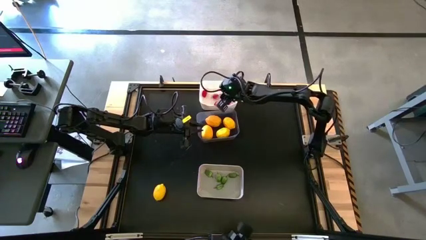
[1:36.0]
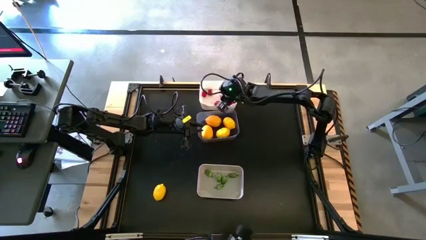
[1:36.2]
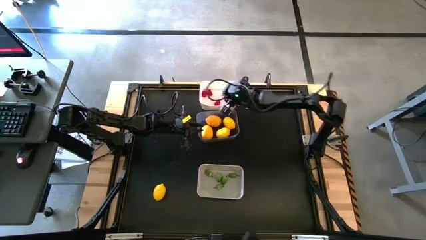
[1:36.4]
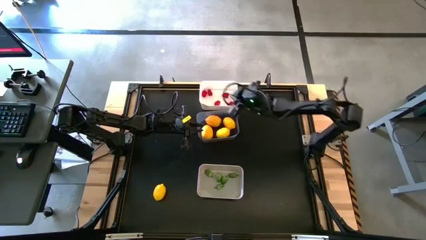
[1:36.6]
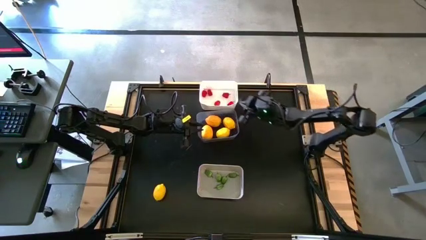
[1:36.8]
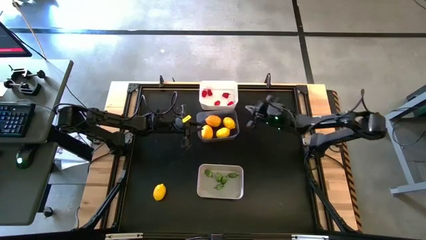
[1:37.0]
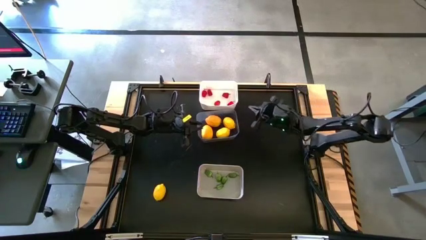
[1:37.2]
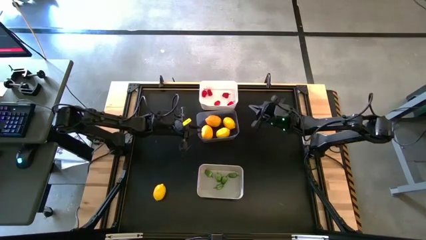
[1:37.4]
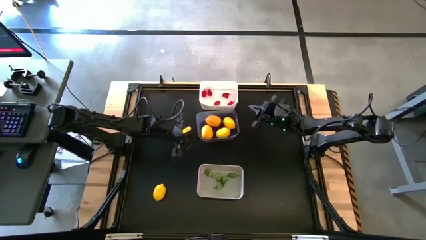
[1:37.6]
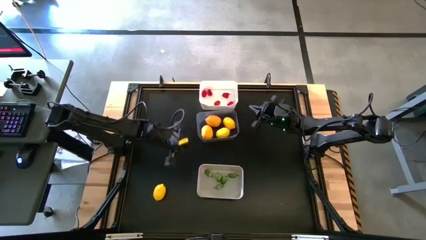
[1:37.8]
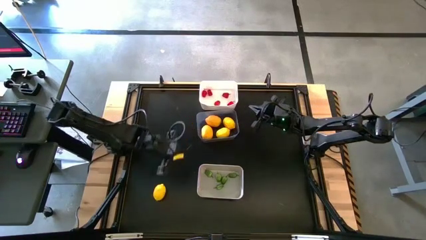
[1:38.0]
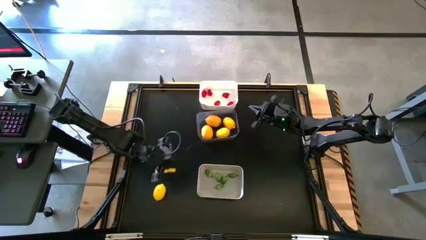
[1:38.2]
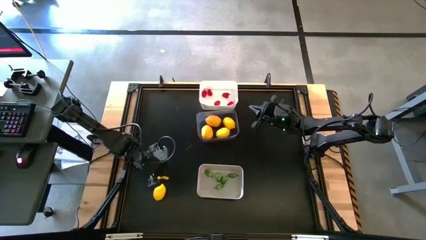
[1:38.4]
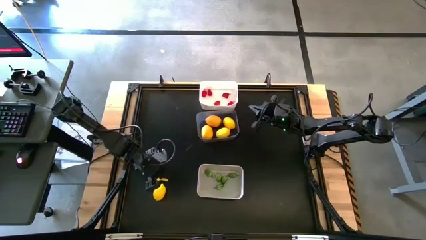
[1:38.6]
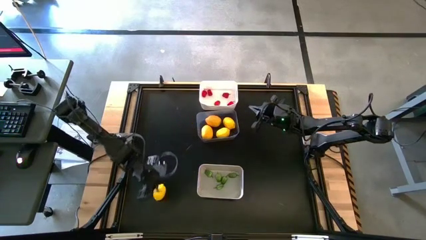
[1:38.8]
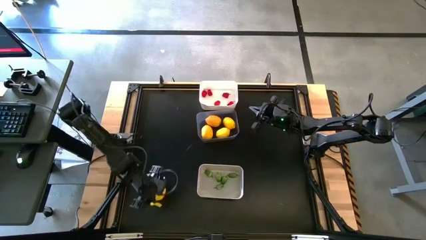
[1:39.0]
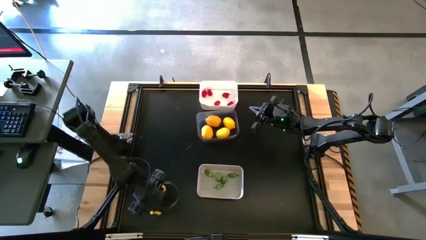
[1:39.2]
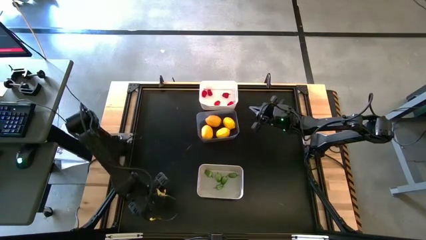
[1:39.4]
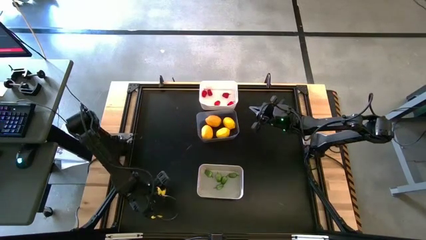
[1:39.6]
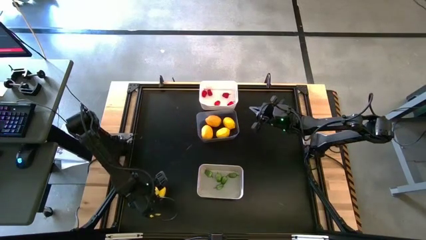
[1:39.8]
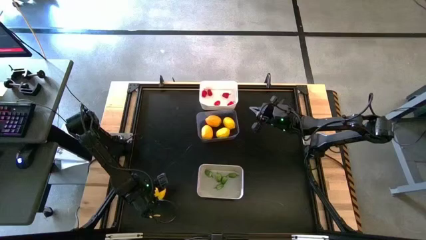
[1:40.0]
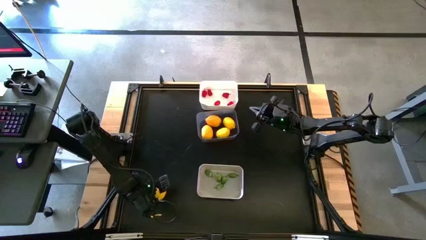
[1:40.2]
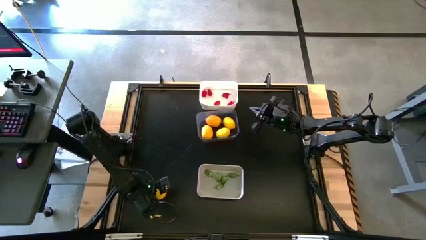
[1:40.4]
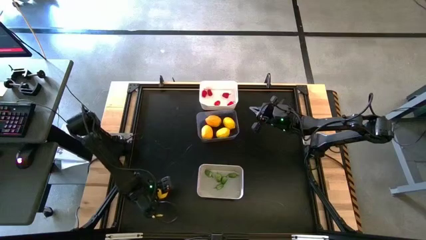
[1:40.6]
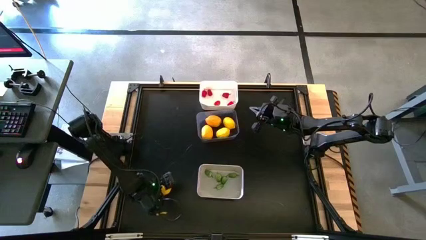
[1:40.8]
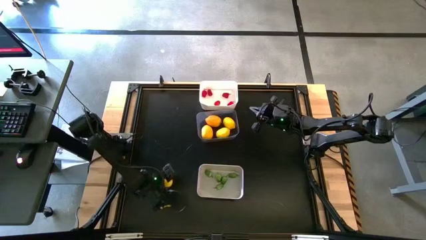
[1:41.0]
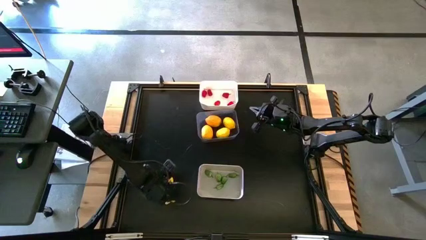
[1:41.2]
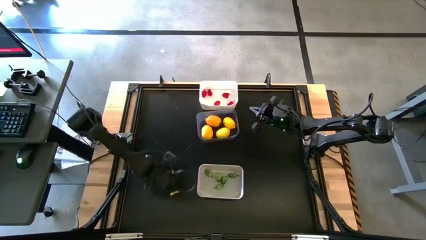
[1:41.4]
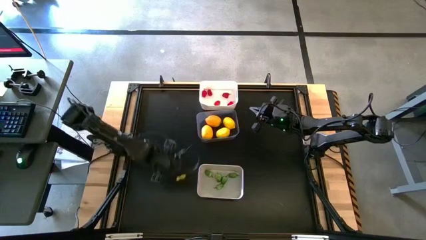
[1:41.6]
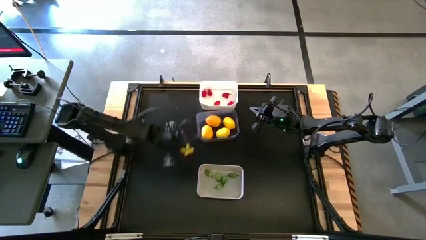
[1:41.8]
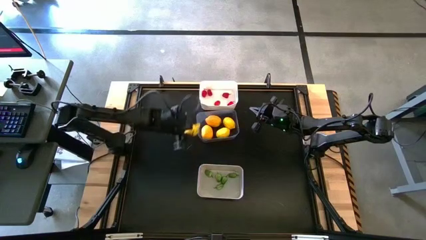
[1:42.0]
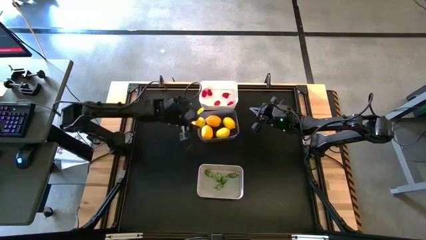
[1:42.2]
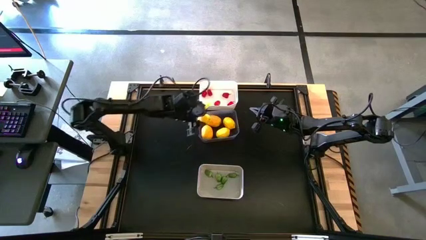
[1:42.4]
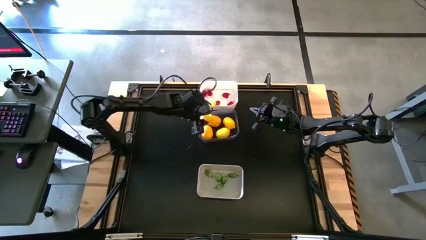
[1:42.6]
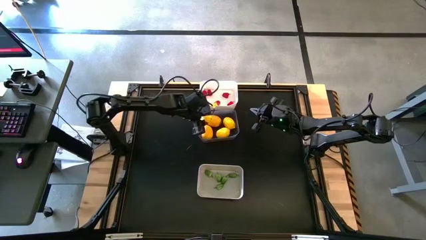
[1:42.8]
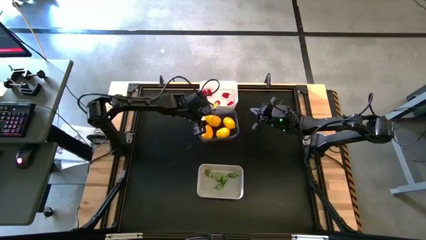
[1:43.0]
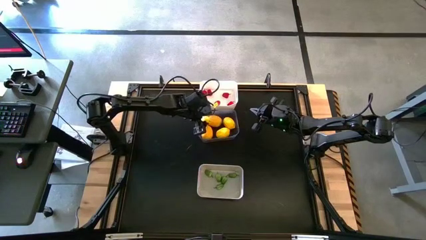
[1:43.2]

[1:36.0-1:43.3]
Task: Sort produce into baskets
Put the yellow lemon into the transparent bin

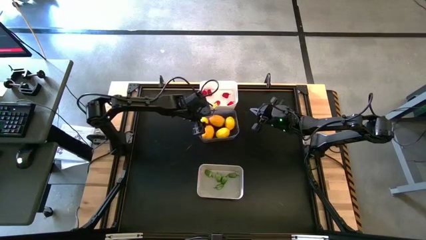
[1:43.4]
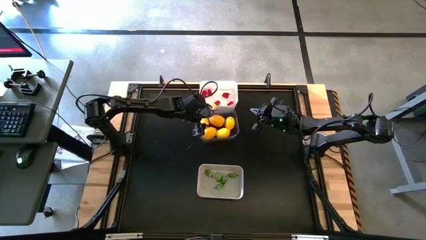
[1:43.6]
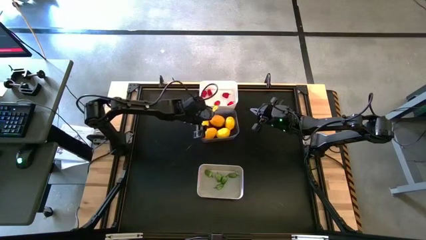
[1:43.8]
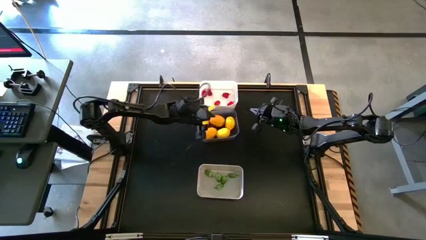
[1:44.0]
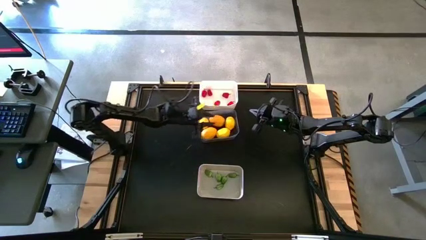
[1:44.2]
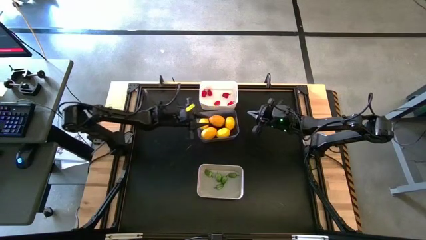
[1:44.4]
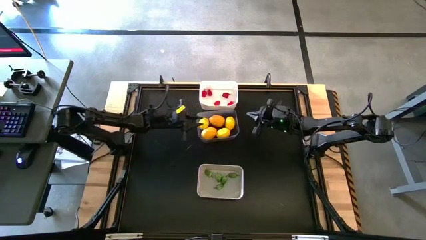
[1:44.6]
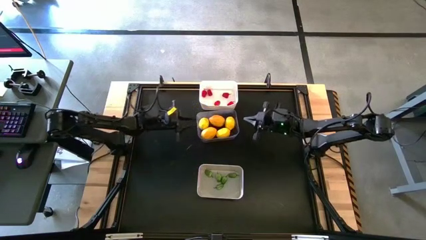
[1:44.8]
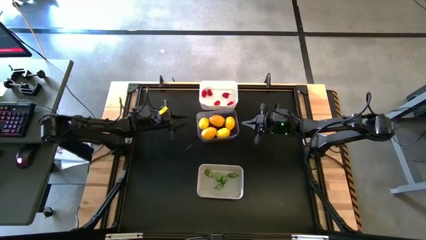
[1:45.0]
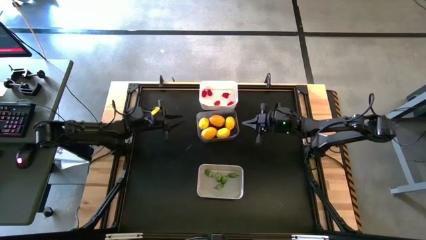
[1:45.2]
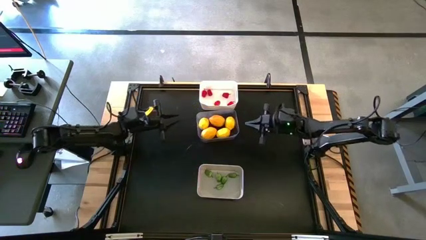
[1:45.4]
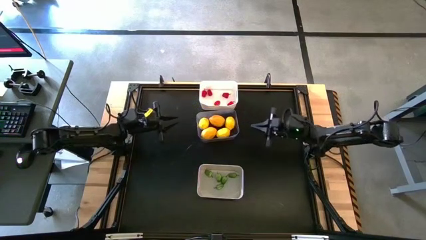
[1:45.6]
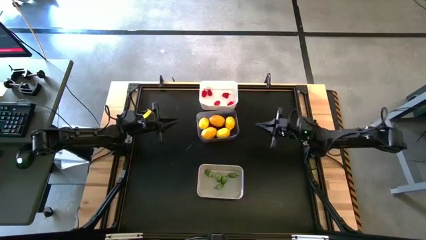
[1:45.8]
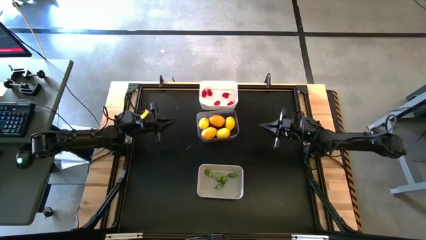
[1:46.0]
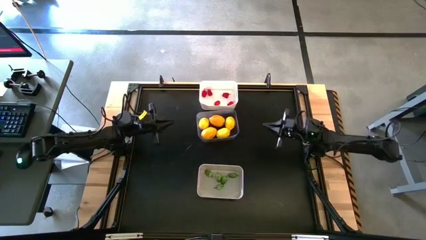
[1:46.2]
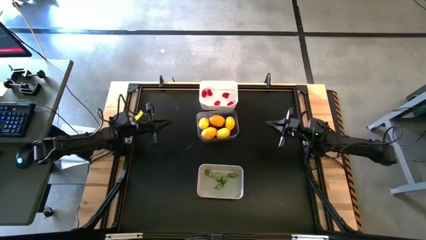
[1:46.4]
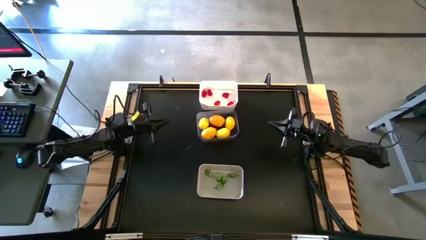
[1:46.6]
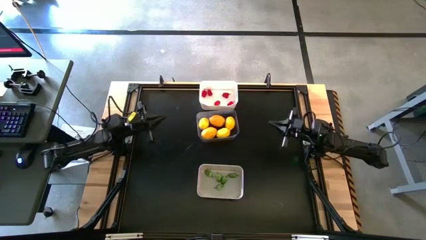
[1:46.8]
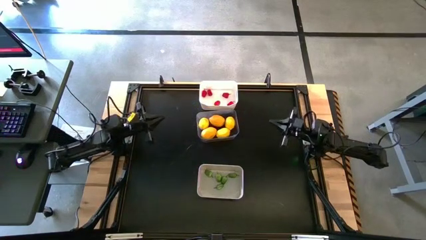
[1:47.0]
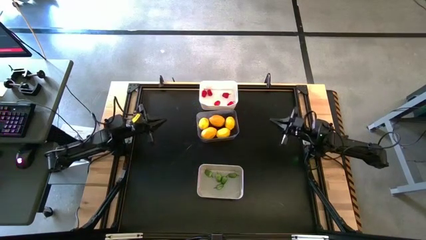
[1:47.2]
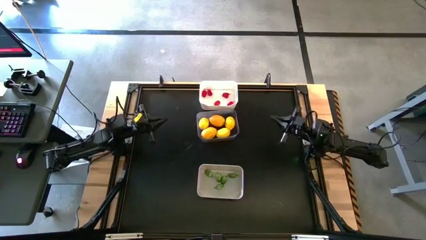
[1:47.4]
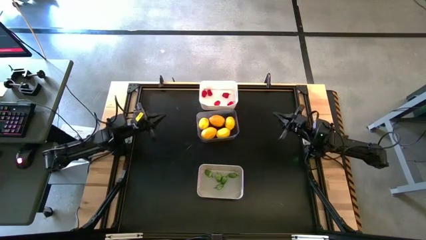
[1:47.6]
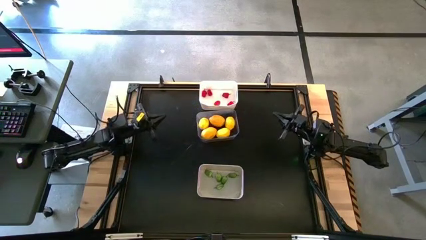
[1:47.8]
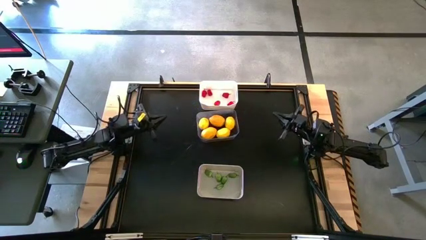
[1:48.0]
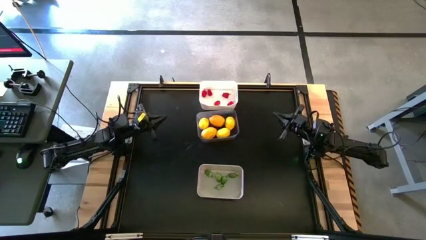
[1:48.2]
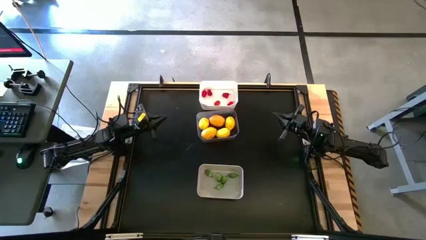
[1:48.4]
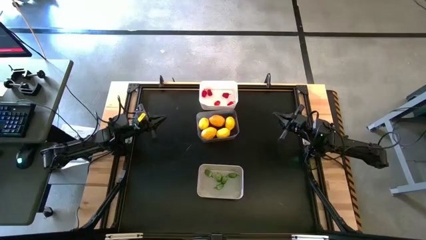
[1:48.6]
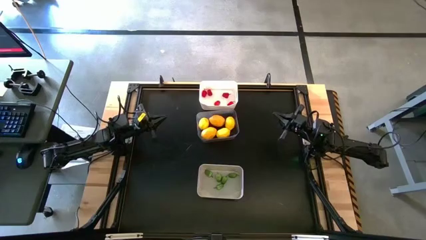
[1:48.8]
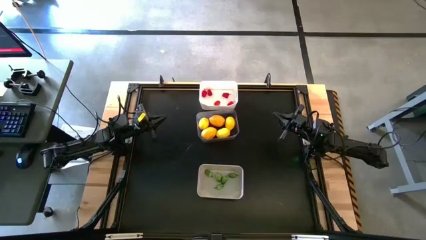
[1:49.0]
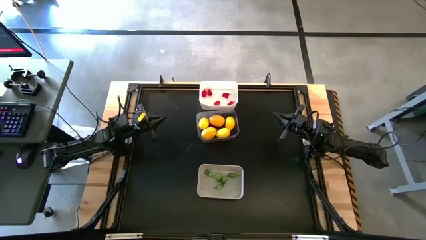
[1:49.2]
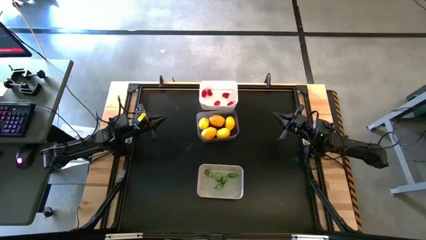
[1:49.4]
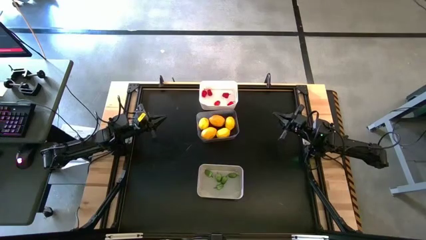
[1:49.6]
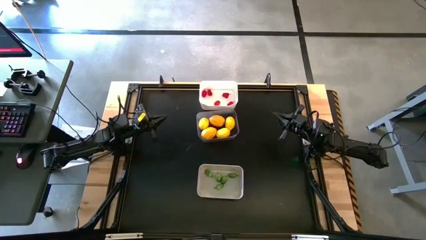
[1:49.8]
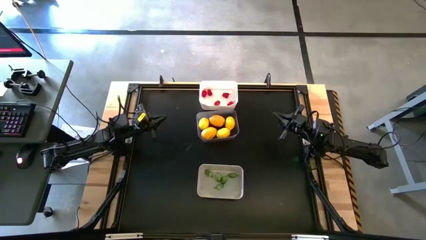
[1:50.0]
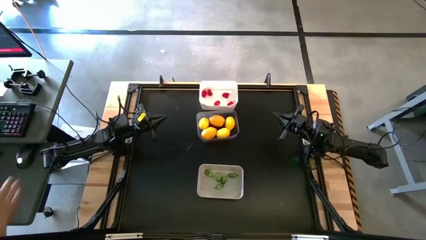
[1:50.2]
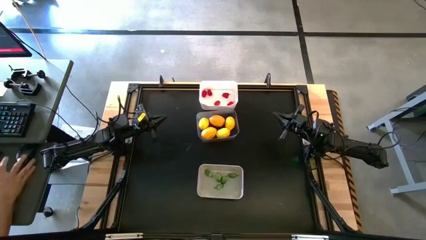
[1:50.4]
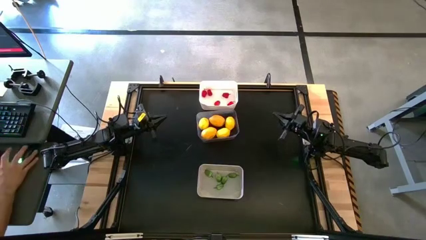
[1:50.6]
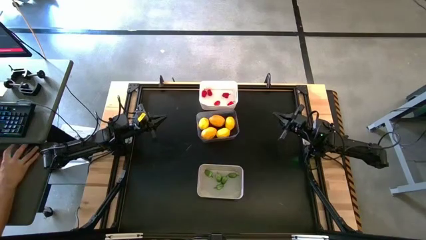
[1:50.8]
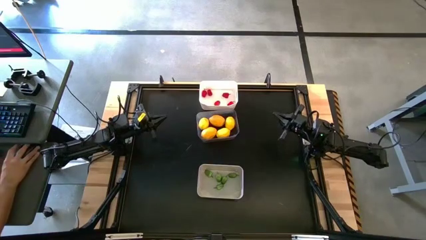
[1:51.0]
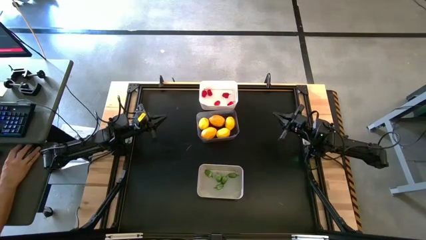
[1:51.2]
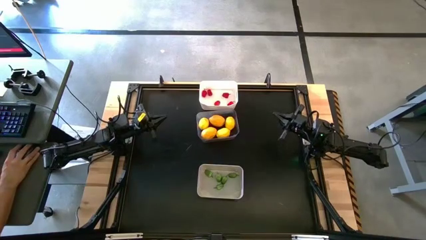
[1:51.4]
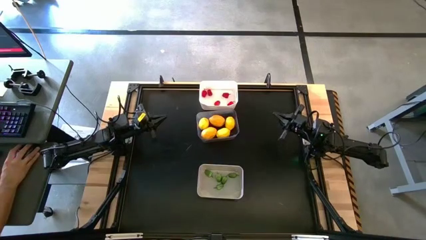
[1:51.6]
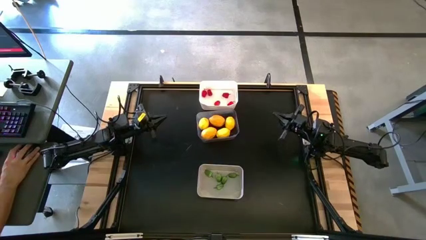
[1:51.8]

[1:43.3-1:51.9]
Return to Home Position

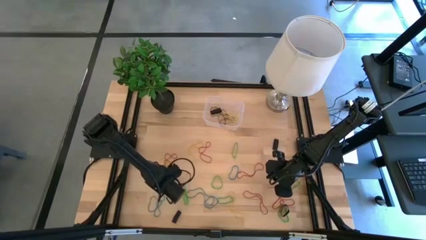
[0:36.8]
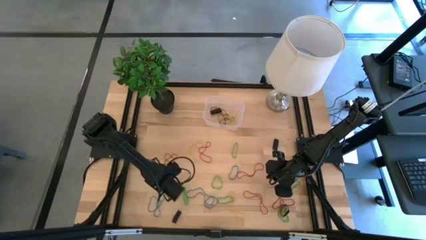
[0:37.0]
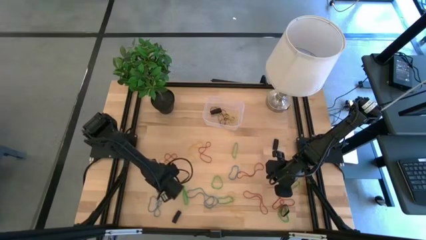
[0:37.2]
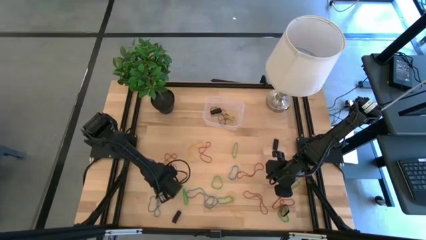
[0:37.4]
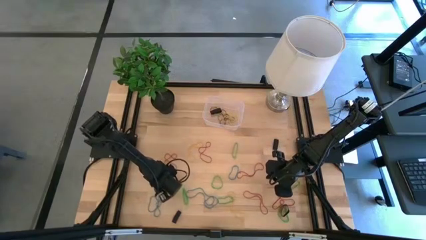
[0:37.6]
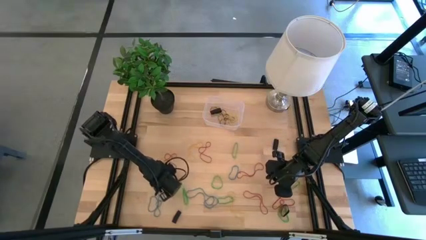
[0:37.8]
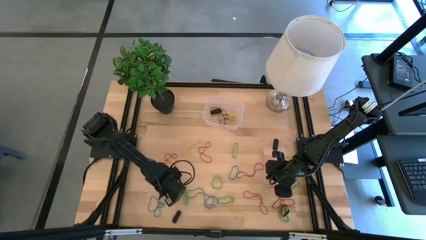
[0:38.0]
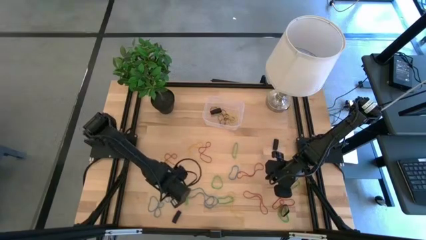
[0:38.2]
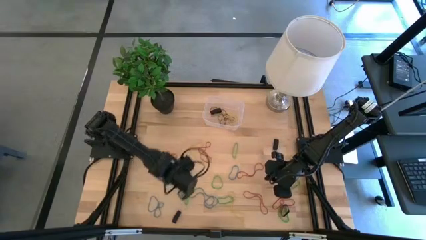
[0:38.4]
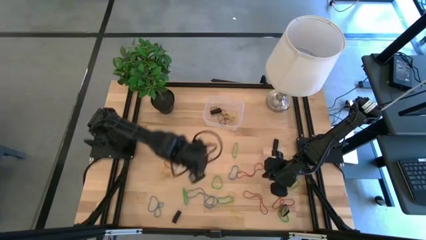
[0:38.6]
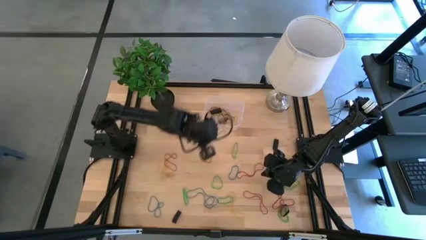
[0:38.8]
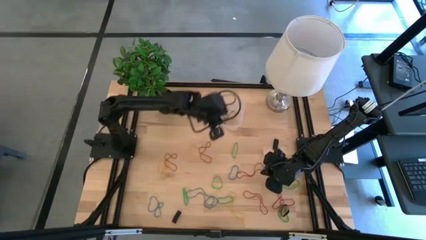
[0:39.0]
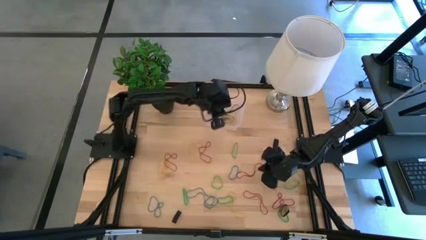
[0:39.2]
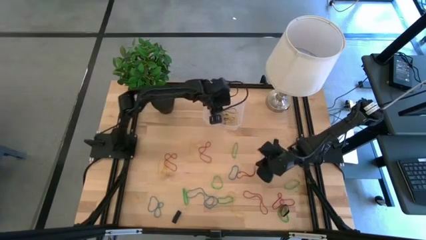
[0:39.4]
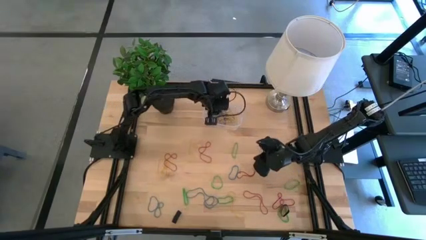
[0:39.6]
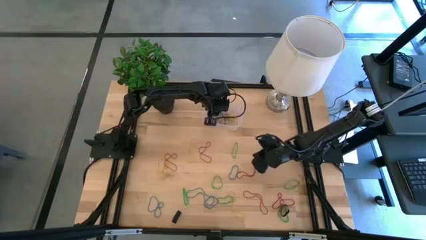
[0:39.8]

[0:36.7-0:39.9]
Task: Pick and place rubber bands into bin
Put the blue rubber band into the transparent bin
